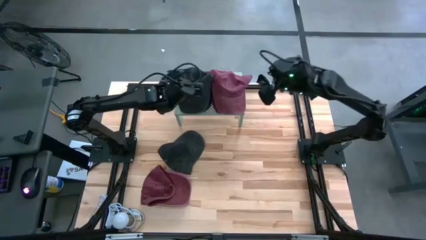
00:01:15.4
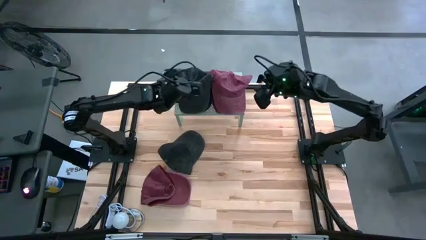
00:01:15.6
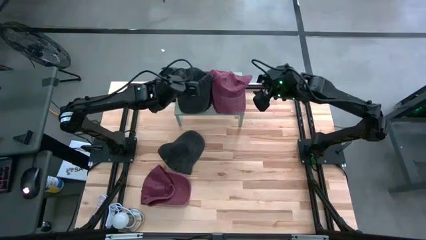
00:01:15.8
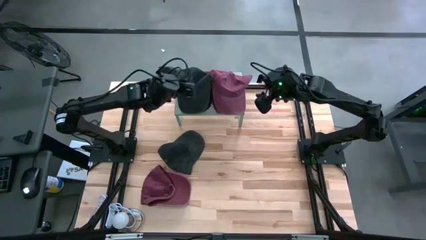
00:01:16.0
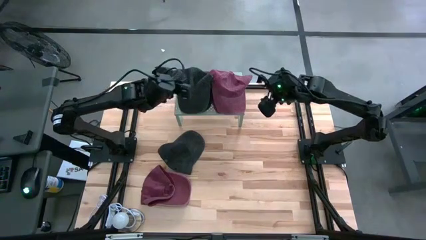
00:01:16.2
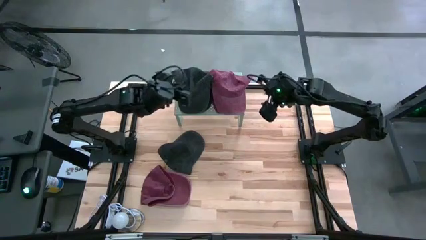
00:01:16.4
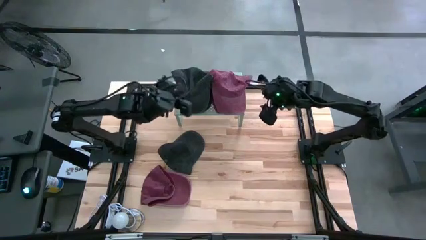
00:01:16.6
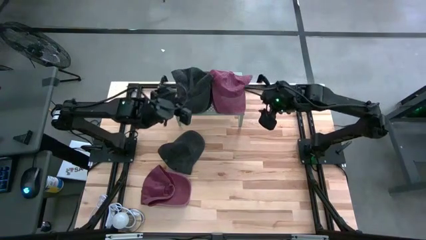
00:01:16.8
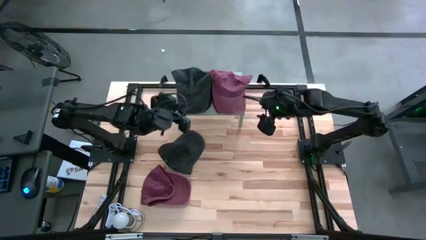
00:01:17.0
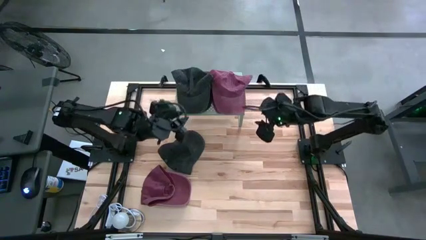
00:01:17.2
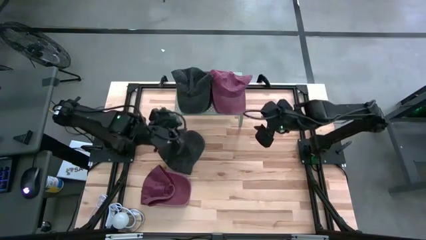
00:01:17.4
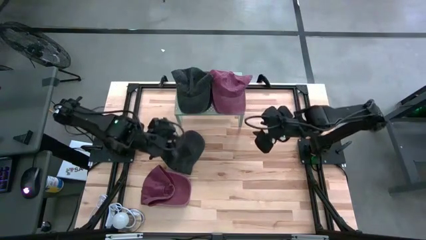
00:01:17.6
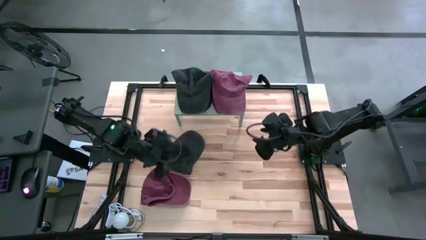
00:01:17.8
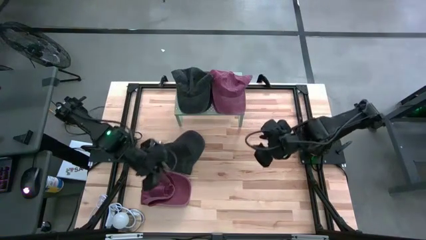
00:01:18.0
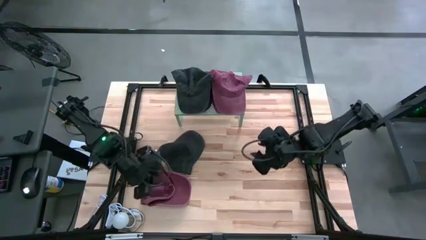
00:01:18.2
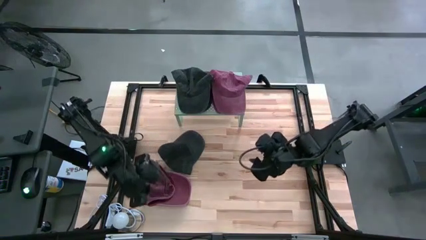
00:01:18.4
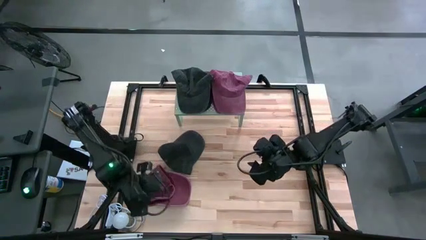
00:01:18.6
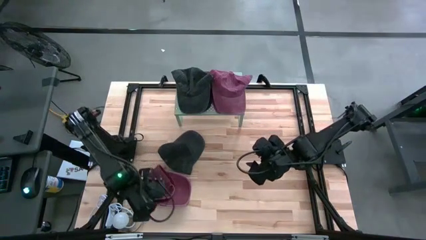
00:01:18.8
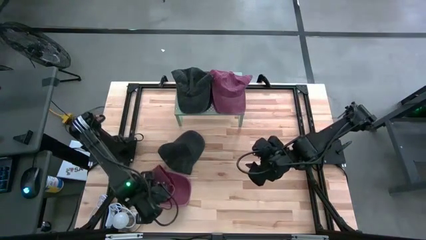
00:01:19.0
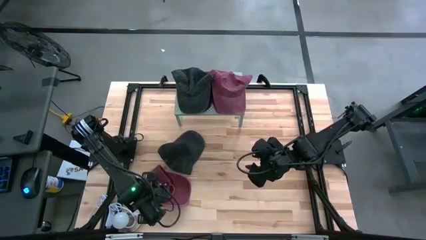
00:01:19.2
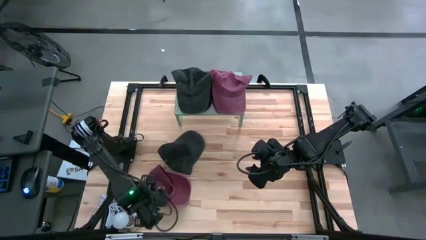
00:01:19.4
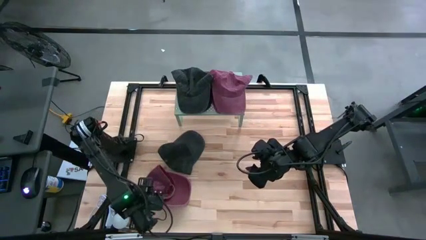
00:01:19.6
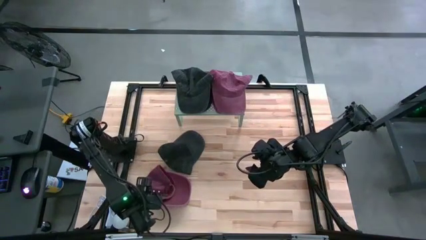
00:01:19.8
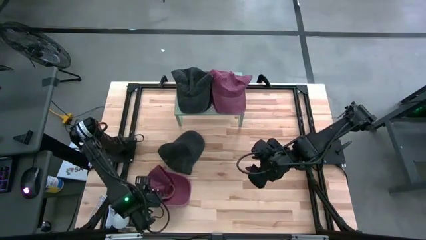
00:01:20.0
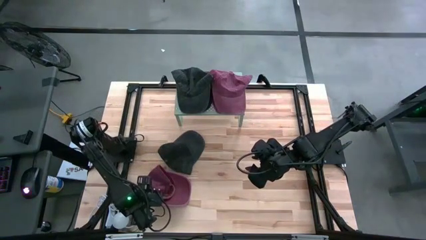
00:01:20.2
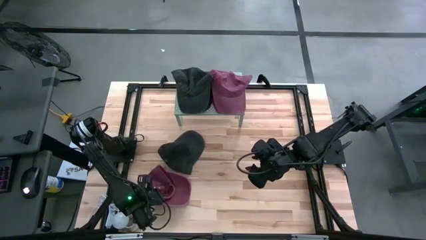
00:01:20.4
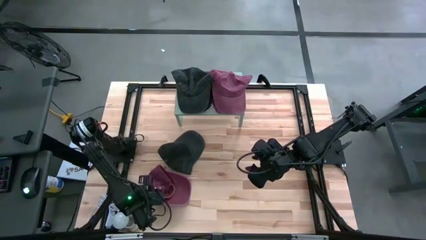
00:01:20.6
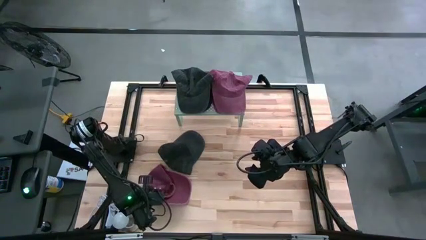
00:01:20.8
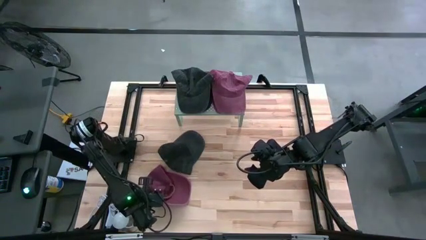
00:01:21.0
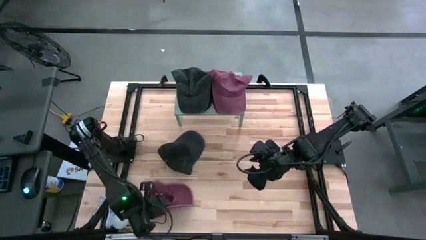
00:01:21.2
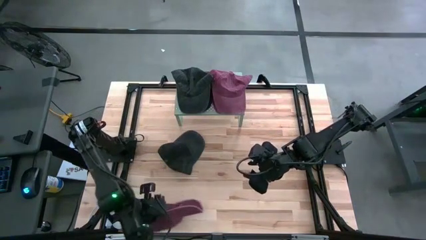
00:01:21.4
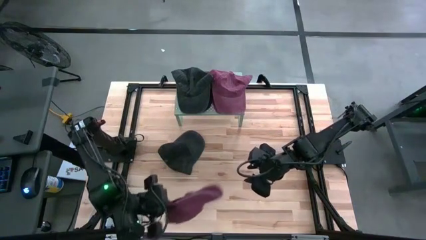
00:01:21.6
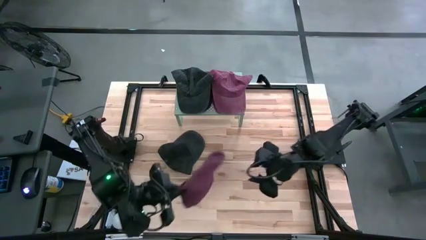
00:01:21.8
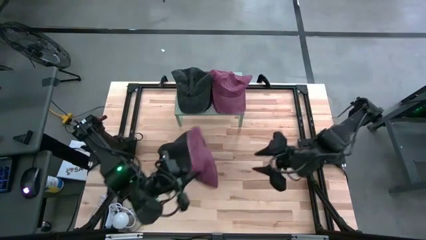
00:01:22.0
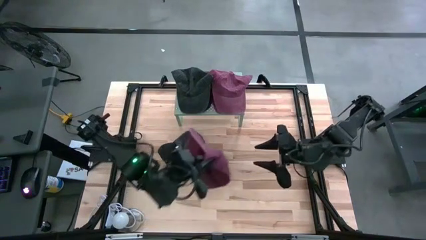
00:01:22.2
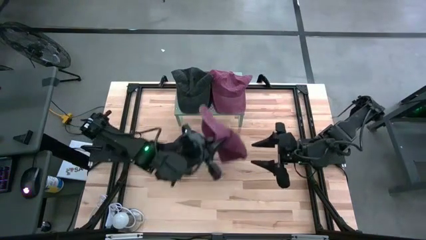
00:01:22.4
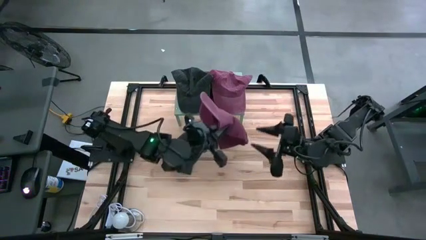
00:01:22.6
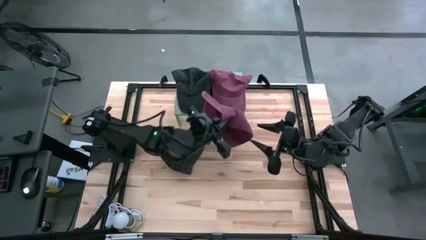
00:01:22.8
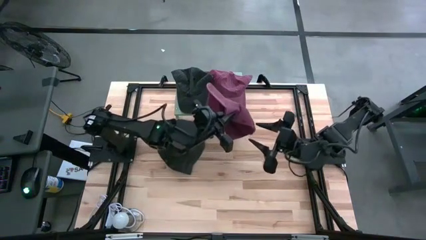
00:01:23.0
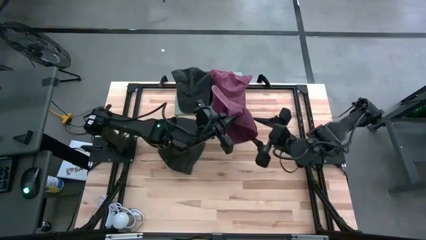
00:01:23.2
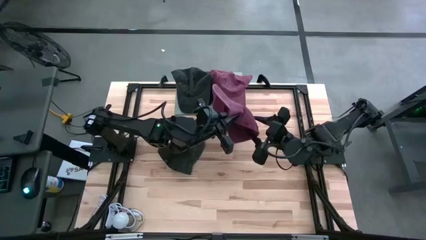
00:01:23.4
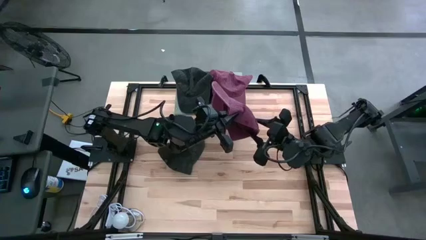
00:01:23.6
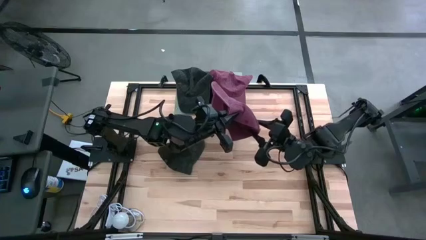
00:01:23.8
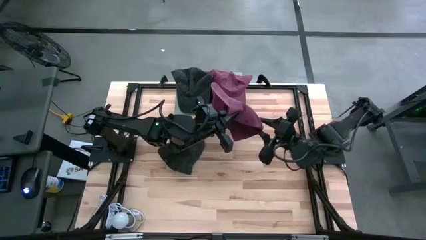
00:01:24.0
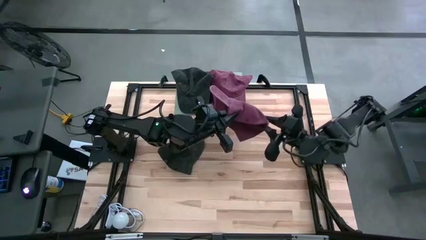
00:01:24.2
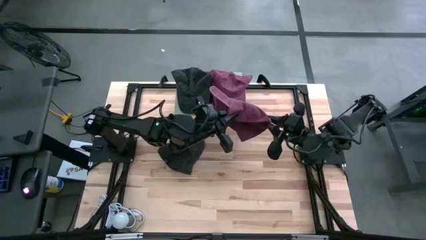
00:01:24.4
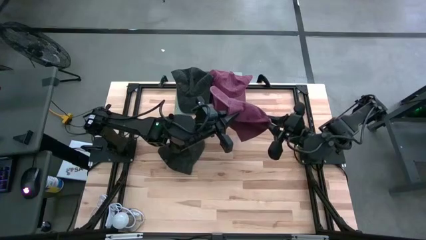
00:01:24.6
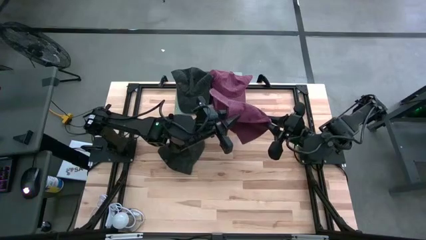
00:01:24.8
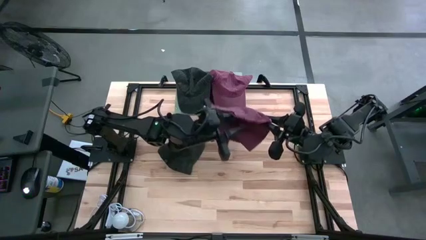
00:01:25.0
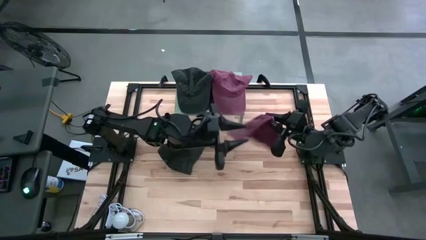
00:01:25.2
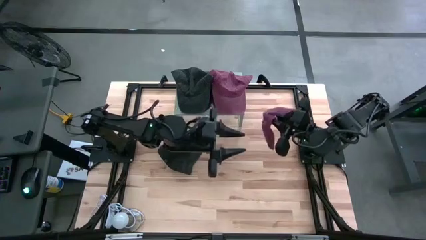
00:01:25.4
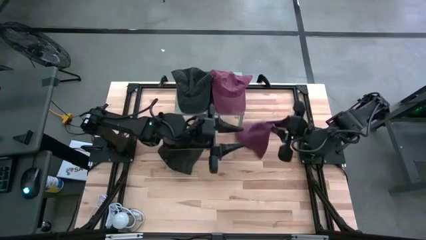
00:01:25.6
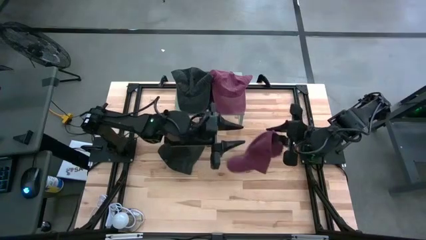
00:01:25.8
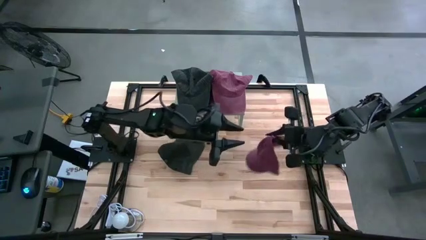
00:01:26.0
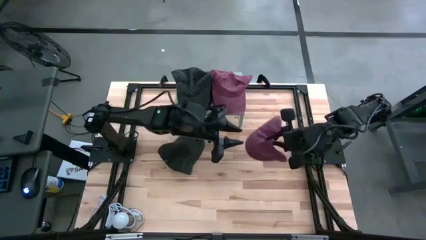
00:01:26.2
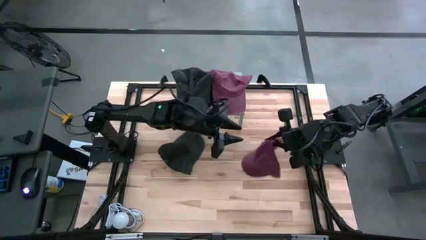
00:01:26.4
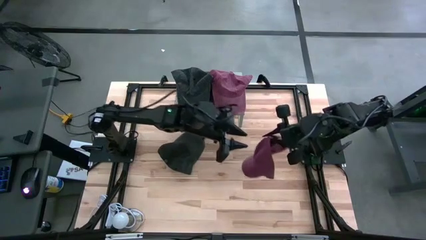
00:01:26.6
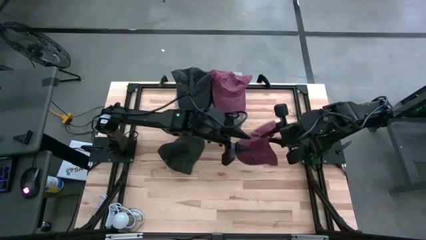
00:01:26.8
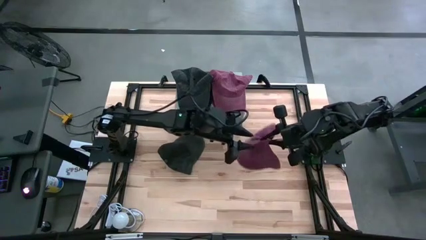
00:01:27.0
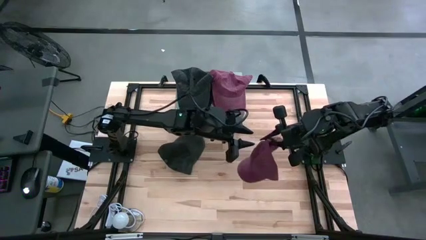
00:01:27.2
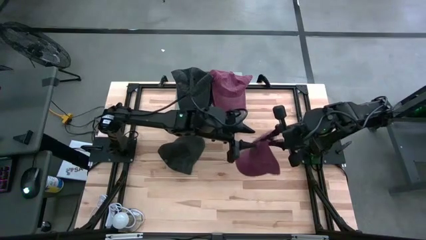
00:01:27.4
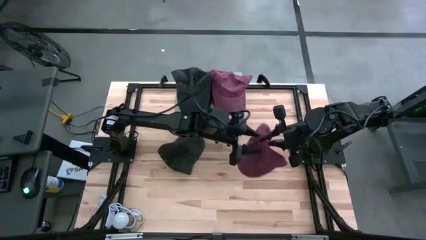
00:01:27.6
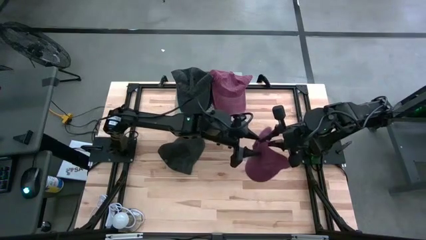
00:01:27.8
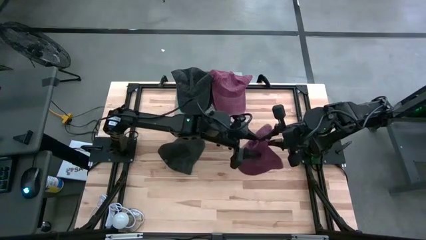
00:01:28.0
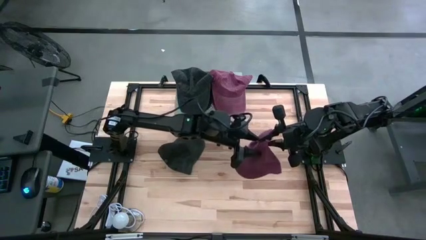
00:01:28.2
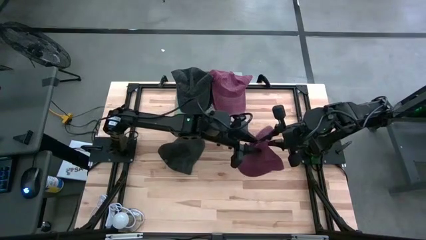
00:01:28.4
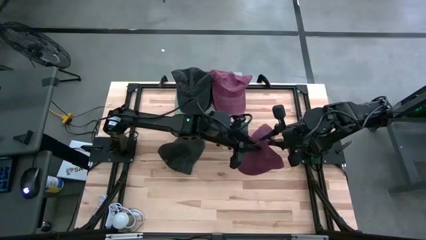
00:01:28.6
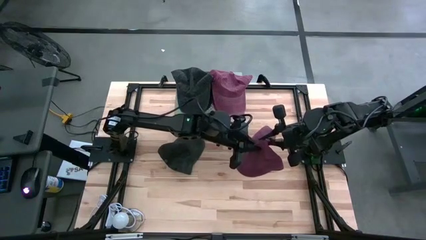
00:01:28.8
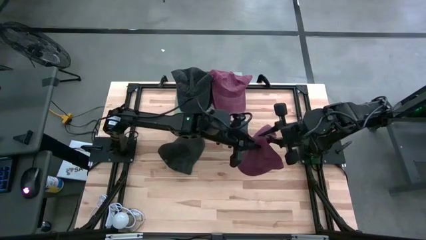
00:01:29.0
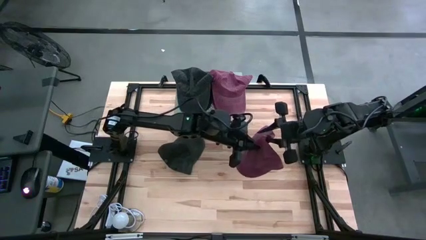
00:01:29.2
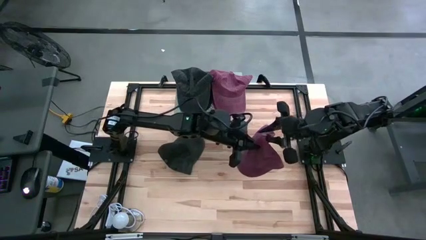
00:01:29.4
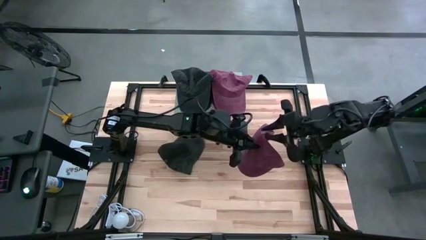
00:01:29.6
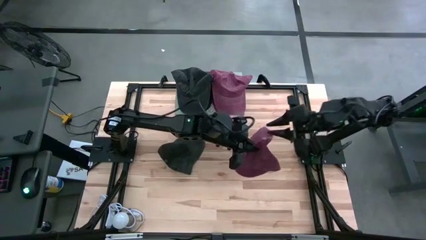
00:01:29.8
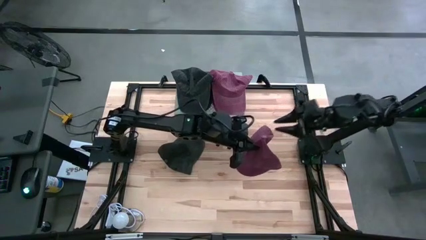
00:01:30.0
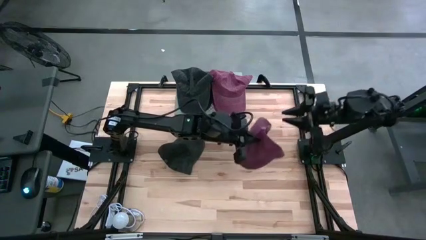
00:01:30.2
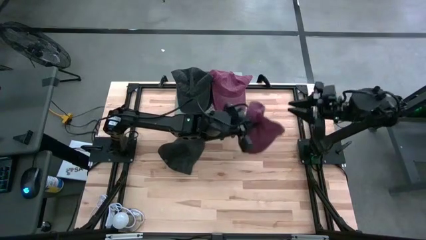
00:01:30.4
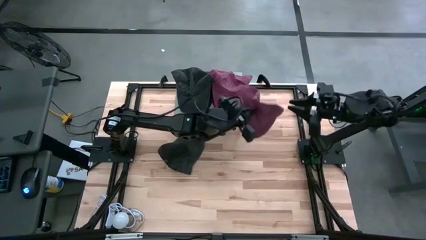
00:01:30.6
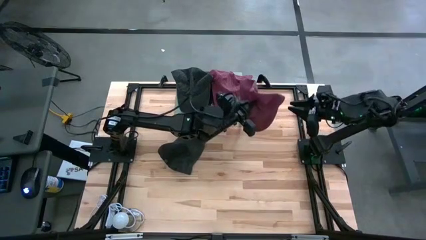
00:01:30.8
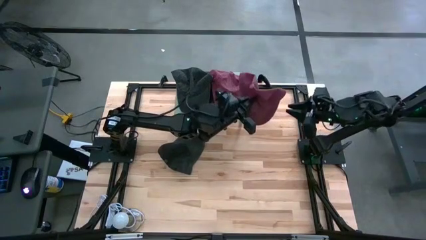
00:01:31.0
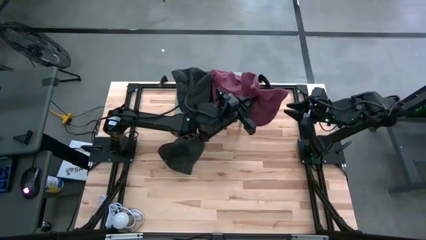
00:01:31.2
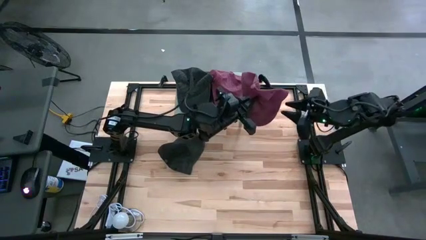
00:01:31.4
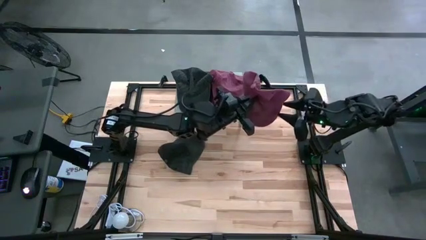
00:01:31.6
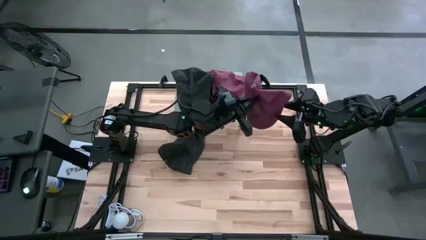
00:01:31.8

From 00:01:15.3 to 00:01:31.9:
Task: Pick & Place hat
Stack the red cap on the red caps on the shelf

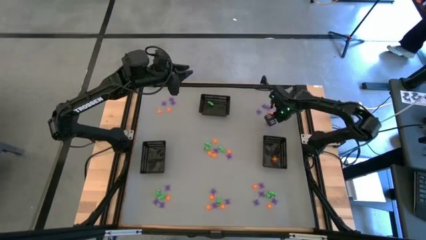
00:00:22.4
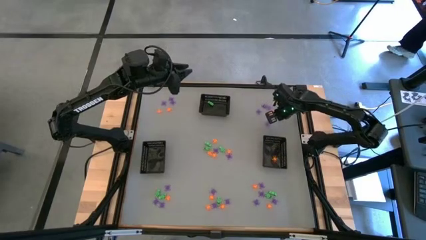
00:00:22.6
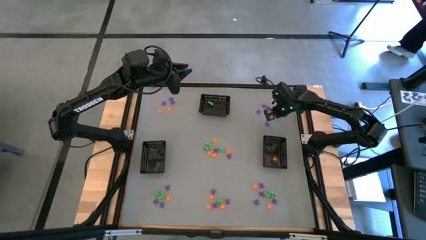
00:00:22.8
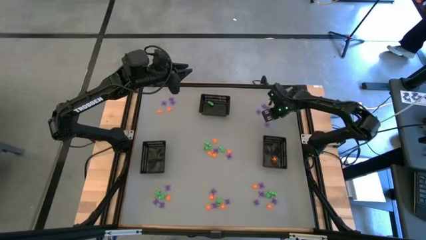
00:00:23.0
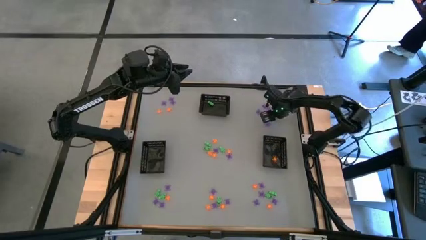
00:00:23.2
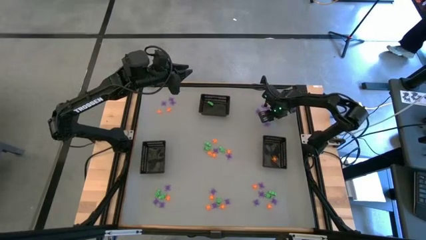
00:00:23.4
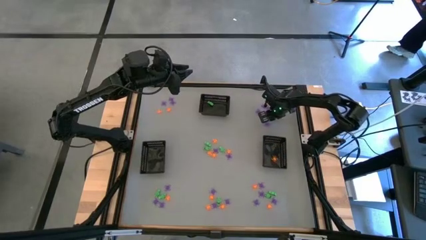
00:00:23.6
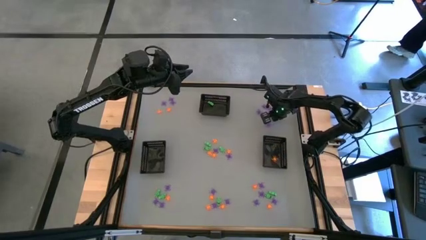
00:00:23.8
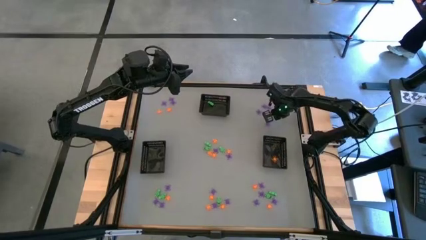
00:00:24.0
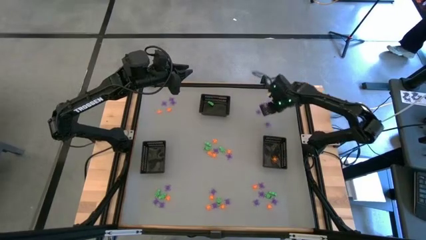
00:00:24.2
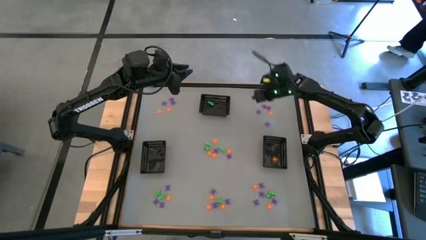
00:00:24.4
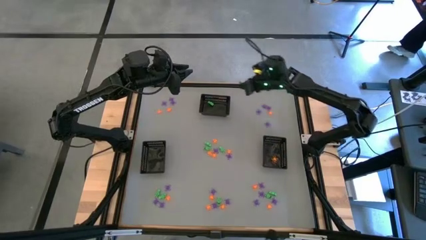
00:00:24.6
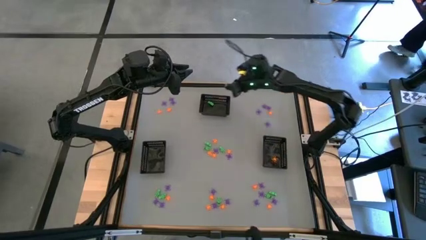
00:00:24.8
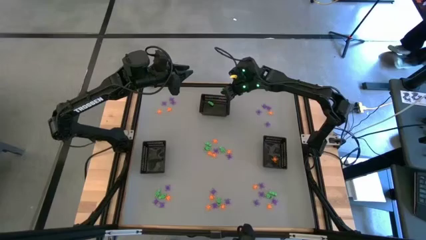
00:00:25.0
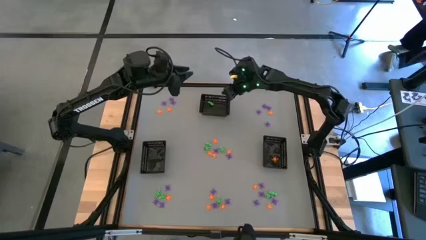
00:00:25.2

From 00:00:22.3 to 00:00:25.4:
Task: Sort Halloween decoration
Put the green skeleton toy into the top bin
